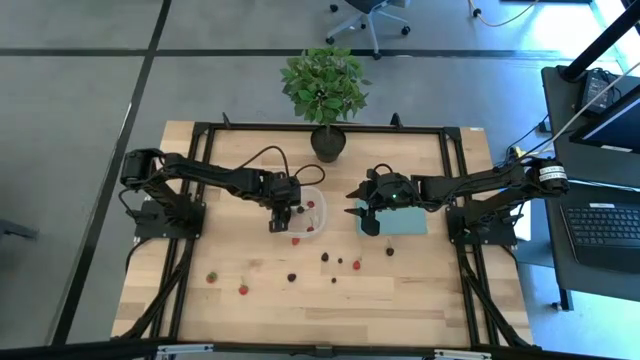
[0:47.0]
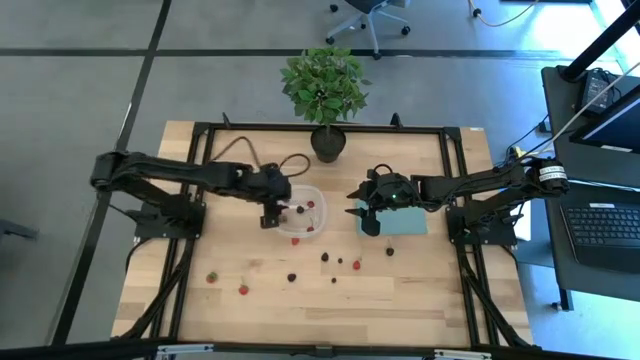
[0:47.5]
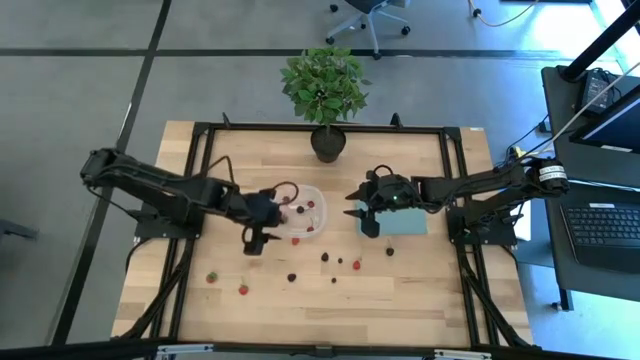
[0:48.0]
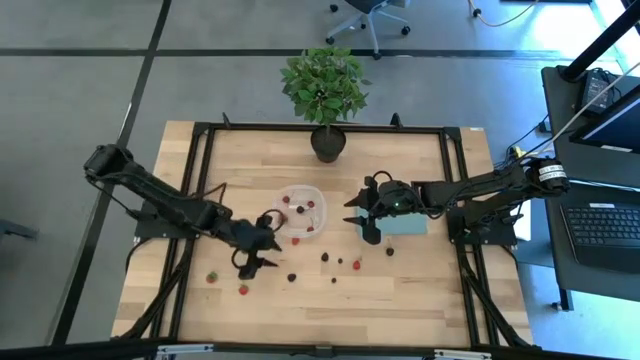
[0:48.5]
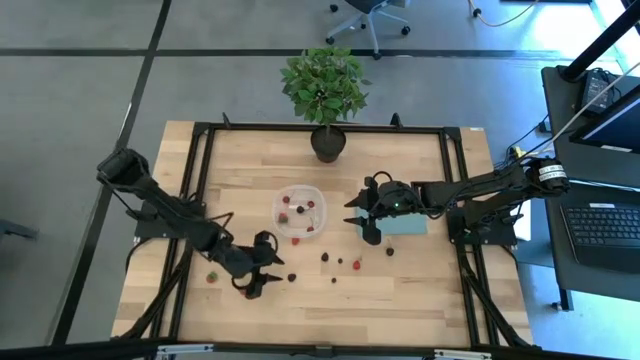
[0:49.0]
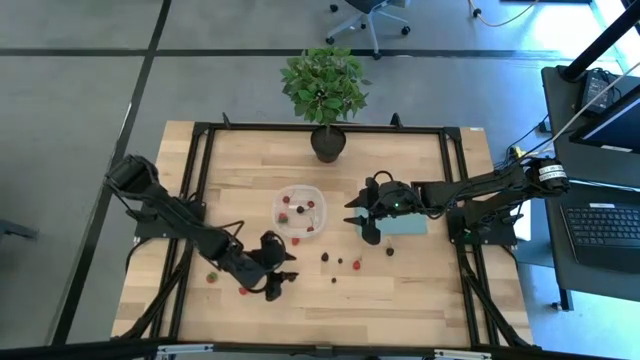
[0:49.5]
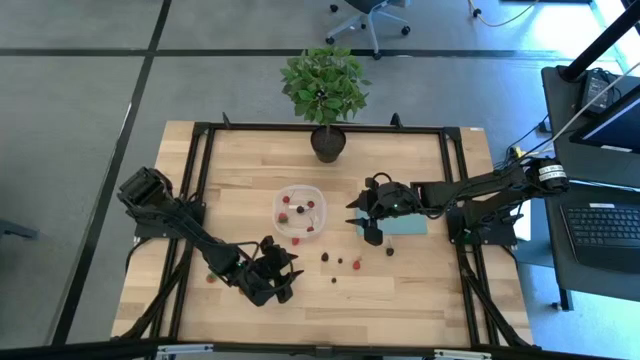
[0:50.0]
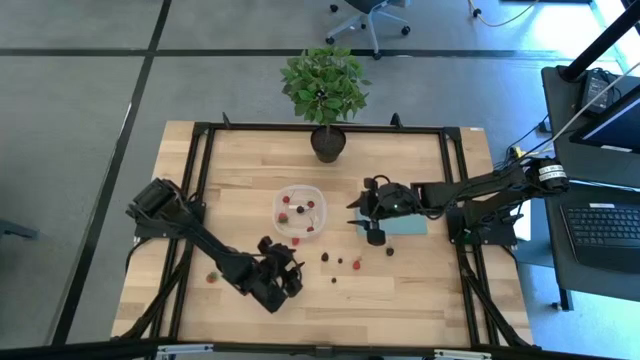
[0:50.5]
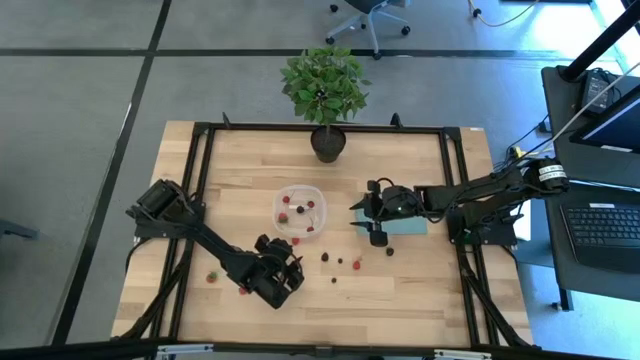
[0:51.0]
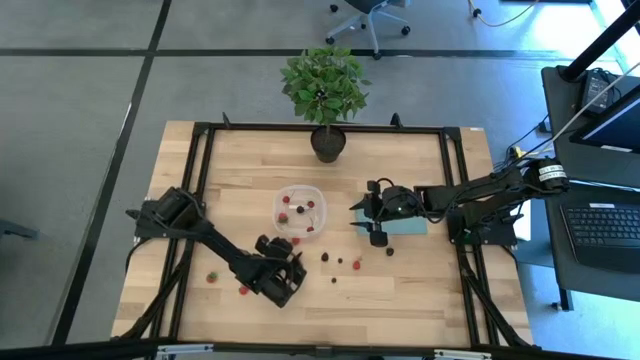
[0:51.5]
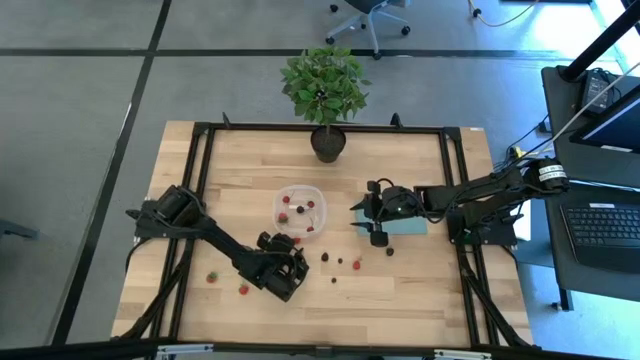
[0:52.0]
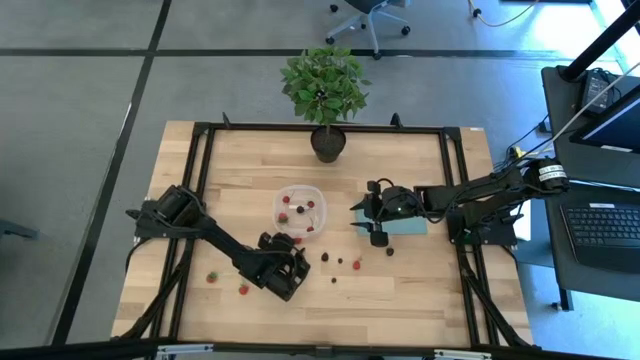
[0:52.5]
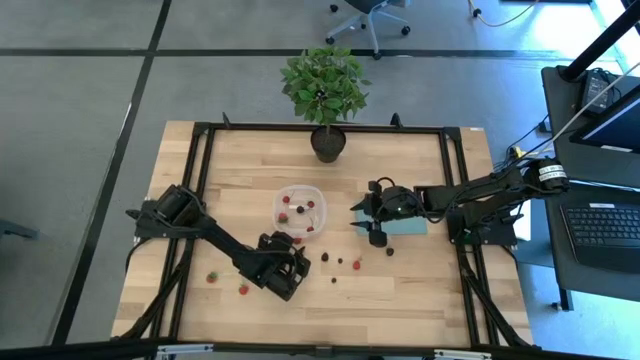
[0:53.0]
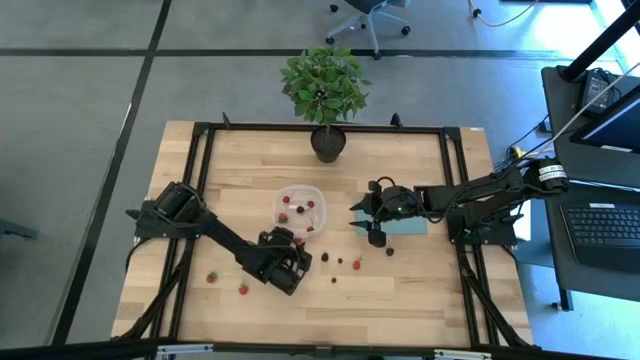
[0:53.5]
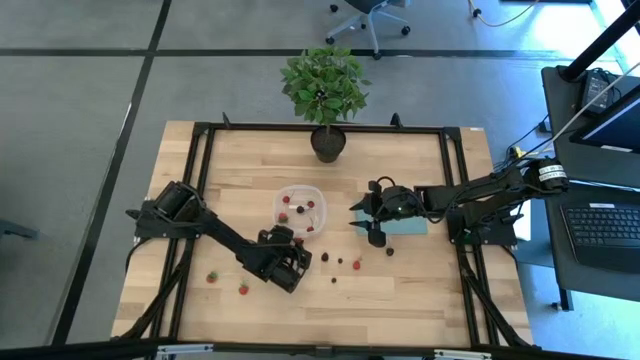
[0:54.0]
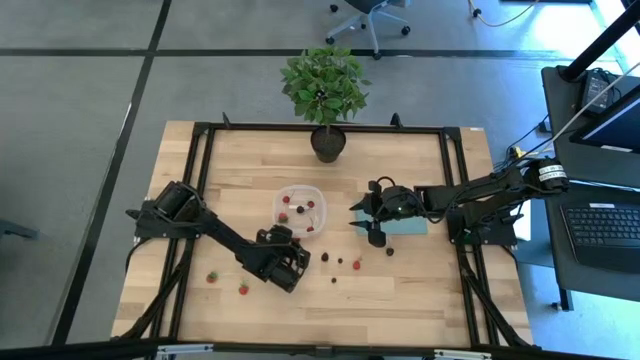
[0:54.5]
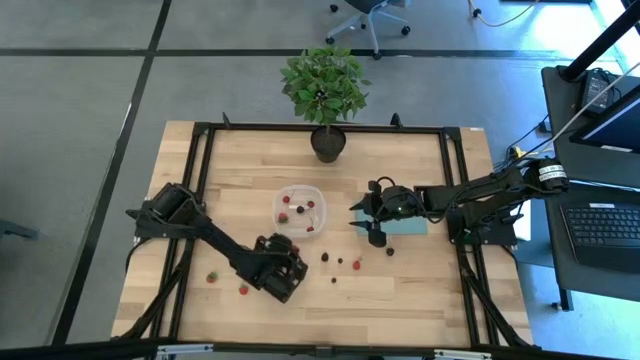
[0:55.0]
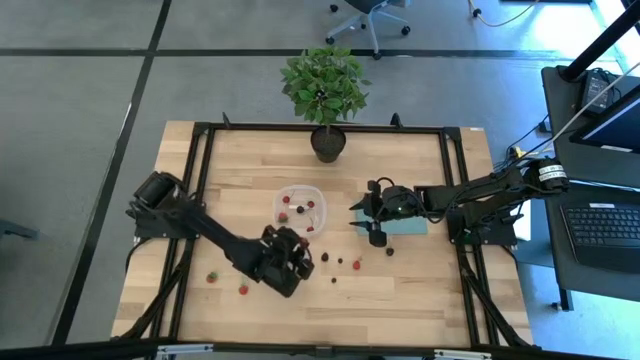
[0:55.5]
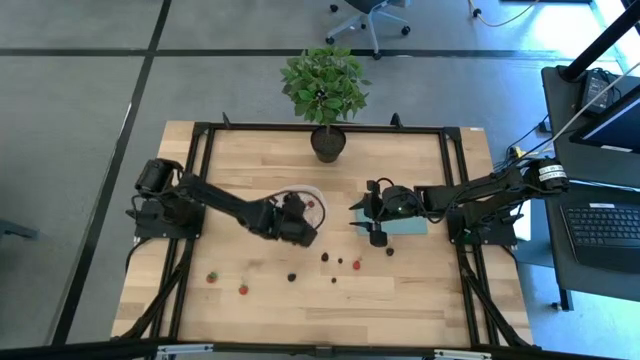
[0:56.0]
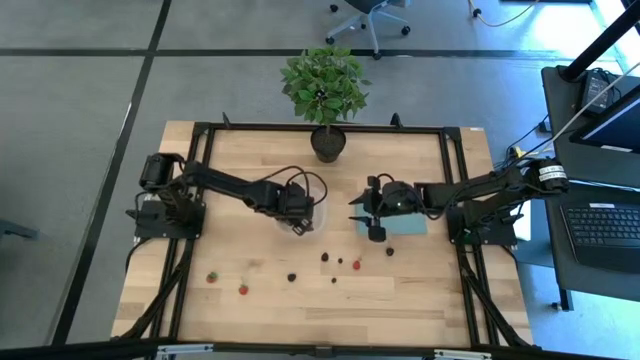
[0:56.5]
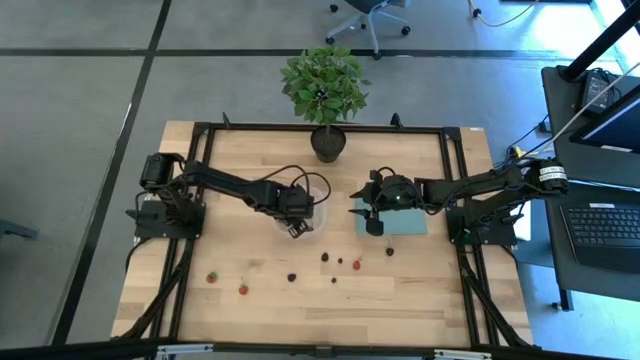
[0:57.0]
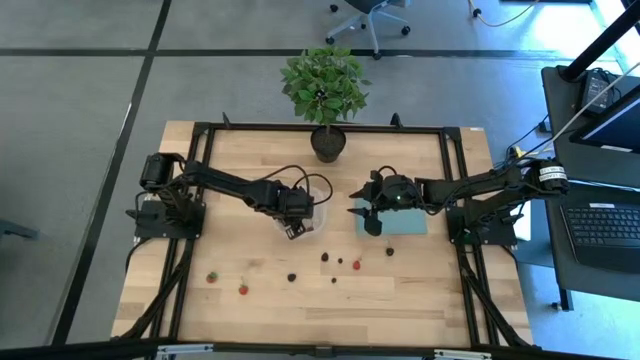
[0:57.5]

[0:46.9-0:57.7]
Task: Pick and placing Produce into tupperware
Put the top raspberry into the container

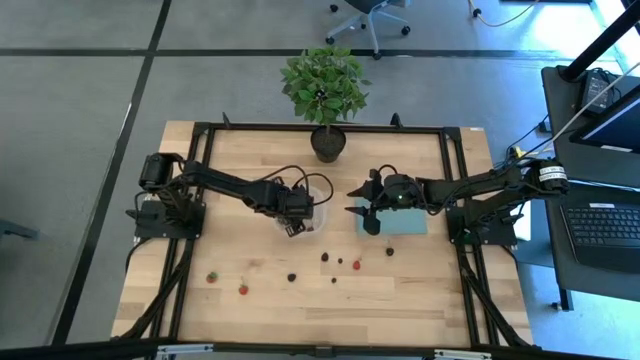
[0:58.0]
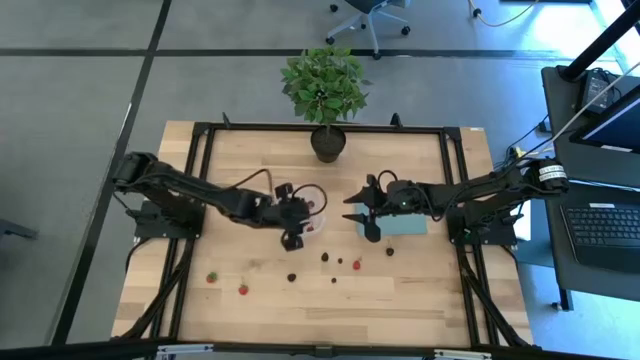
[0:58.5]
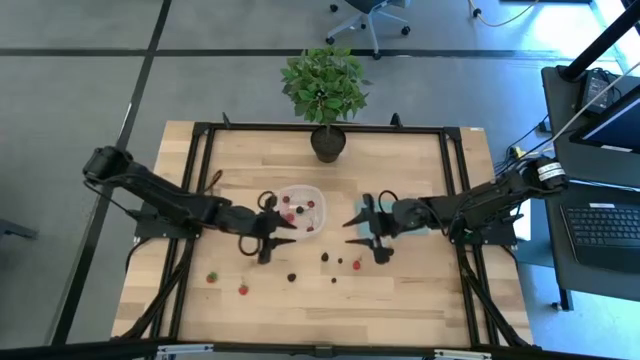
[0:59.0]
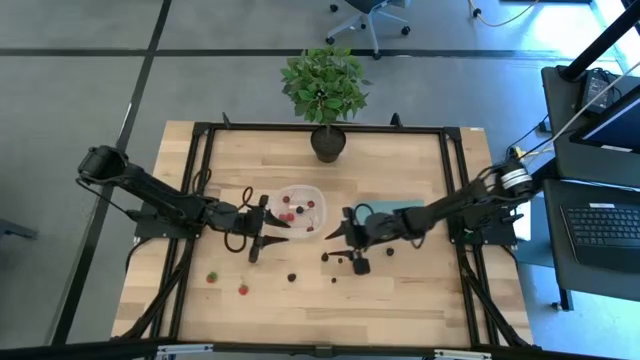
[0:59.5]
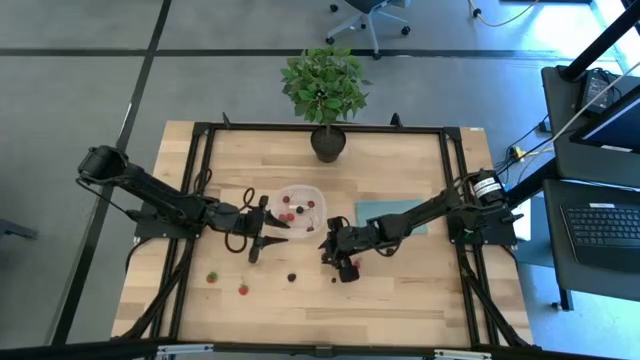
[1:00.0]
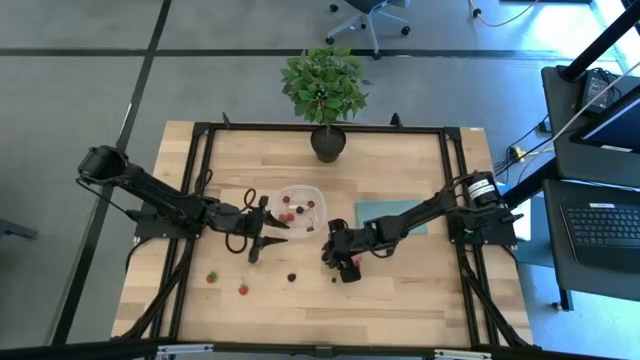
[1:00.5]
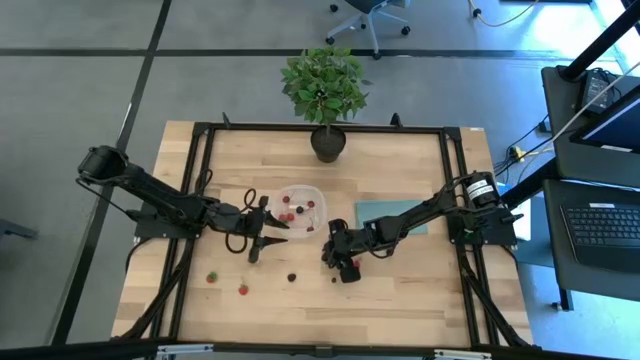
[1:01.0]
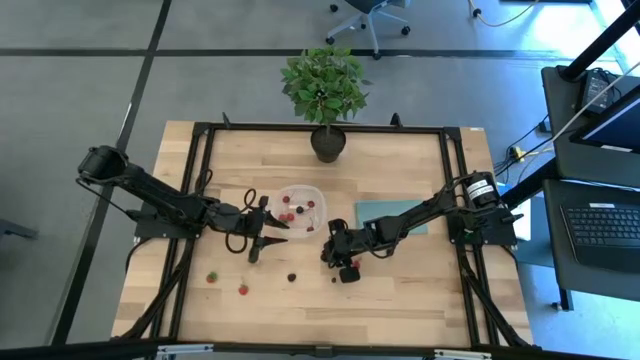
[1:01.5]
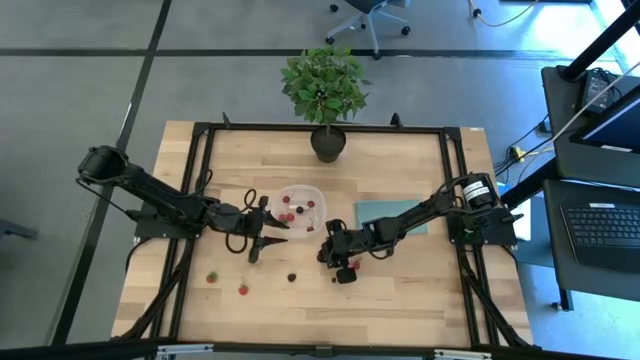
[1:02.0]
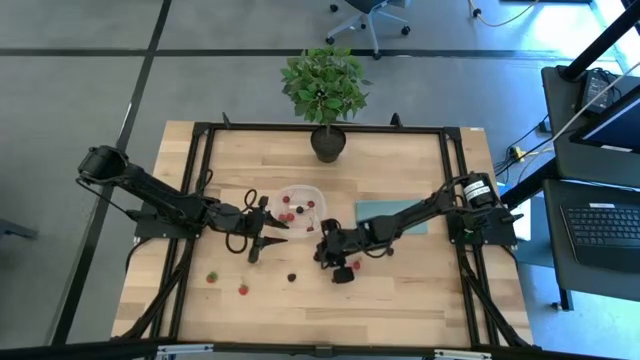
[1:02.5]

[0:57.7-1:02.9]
Put the top blackberry into the container

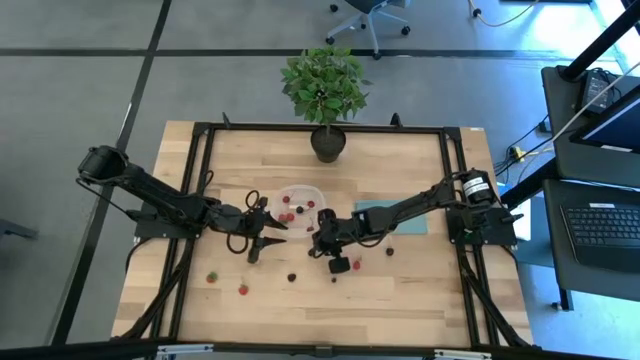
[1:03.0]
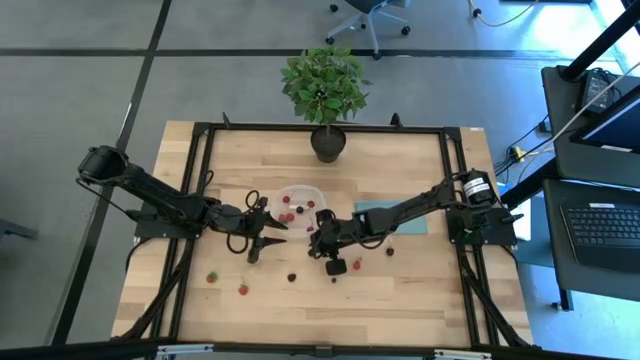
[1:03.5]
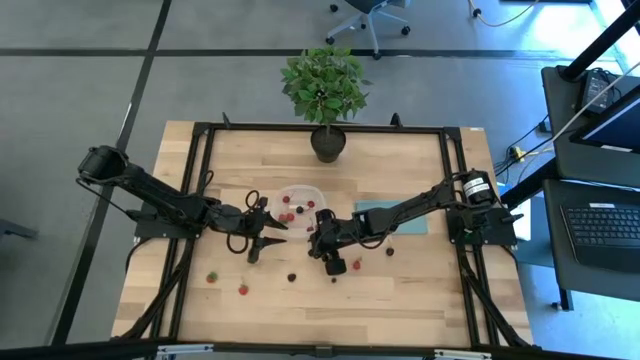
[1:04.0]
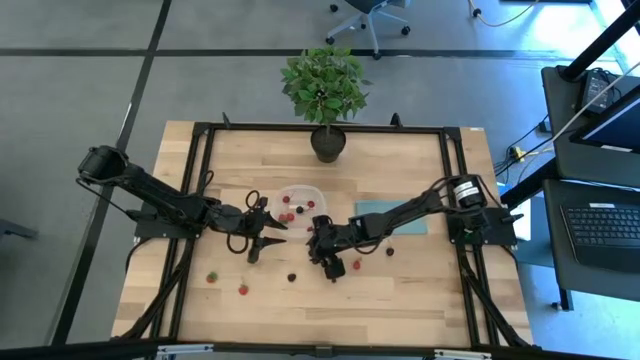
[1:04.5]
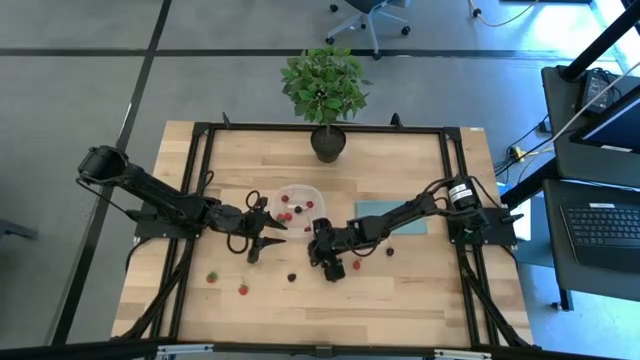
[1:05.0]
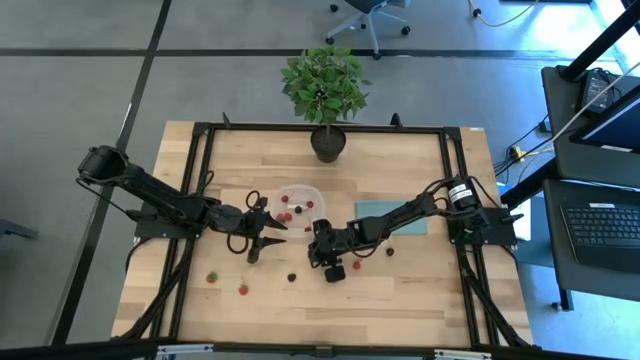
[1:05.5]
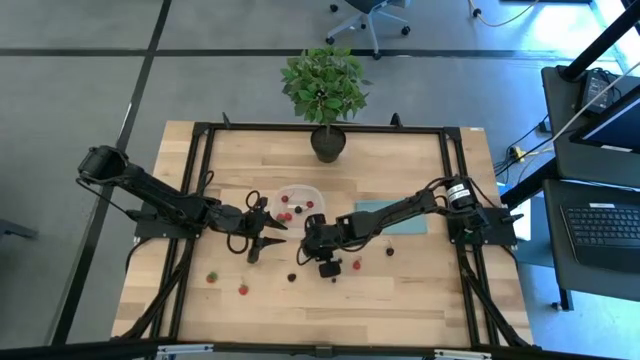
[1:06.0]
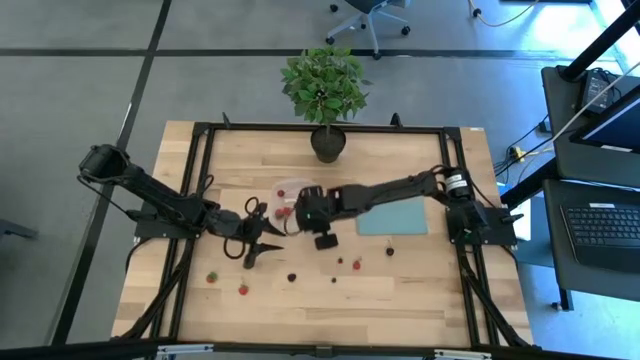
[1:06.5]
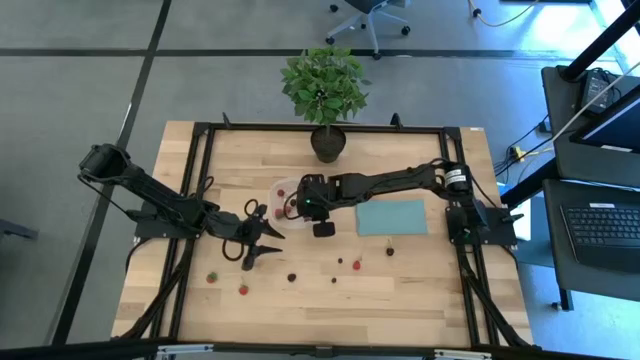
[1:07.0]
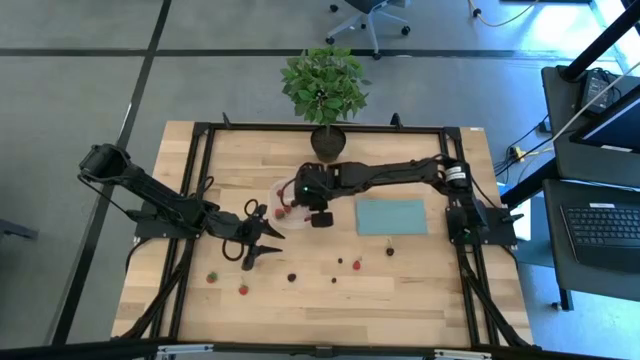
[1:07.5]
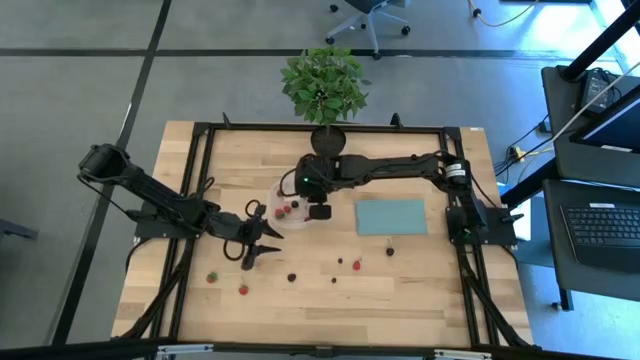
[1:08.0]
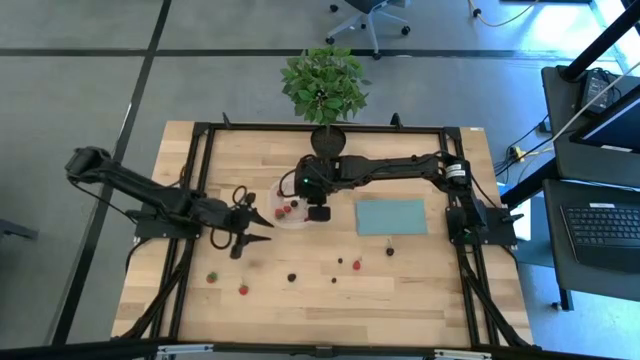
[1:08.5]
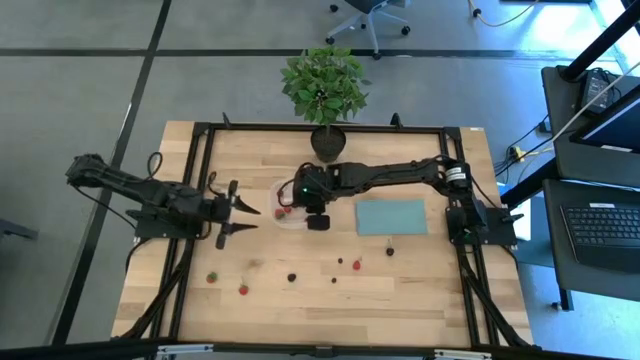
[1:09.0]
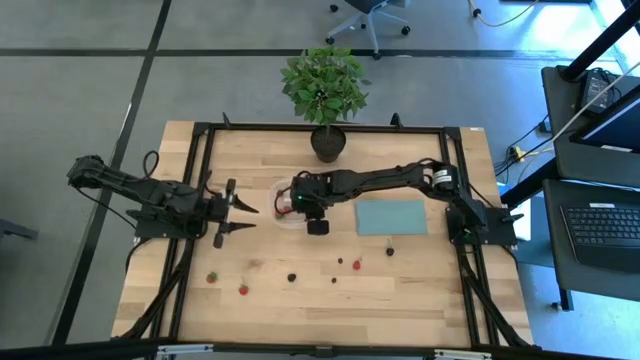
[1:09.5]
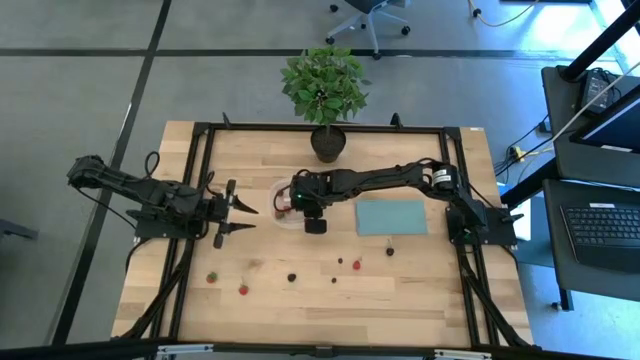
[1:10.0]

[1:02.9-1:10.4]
Put the top blackberry into the container
